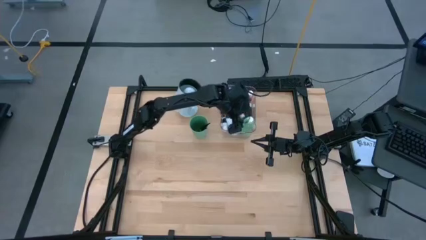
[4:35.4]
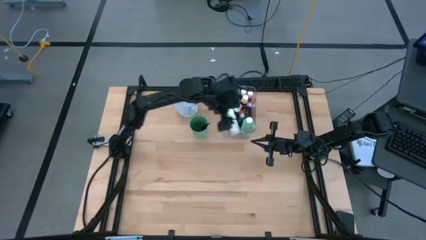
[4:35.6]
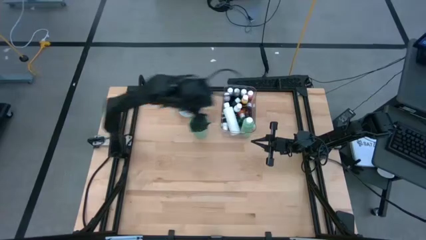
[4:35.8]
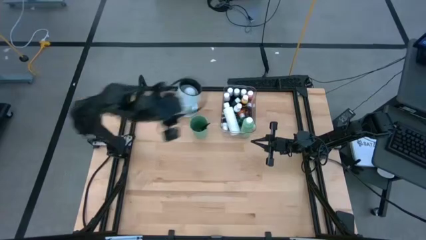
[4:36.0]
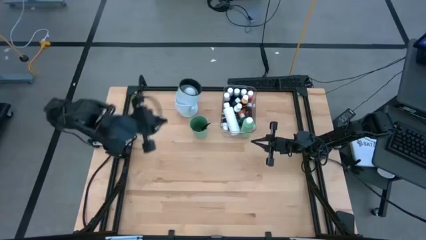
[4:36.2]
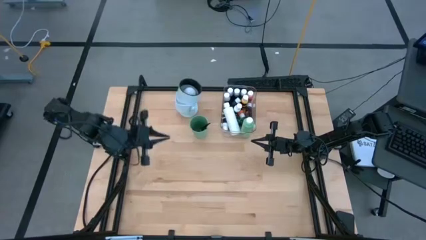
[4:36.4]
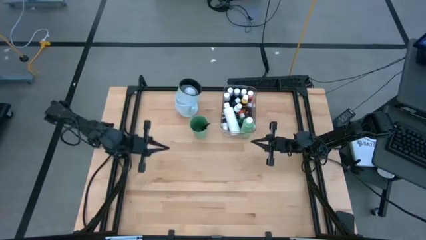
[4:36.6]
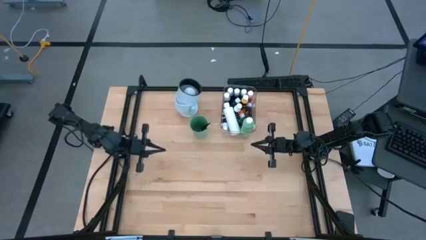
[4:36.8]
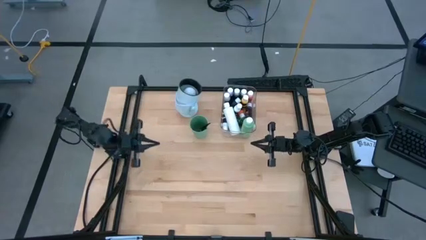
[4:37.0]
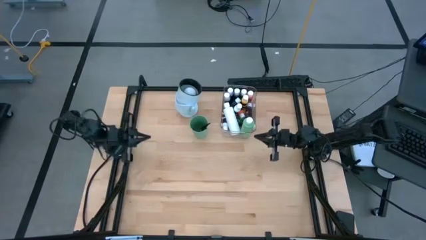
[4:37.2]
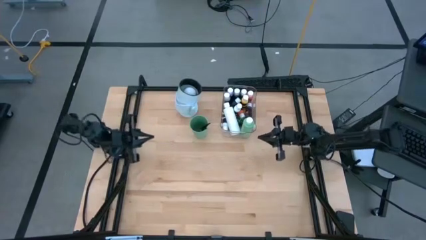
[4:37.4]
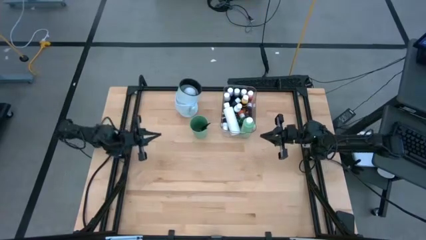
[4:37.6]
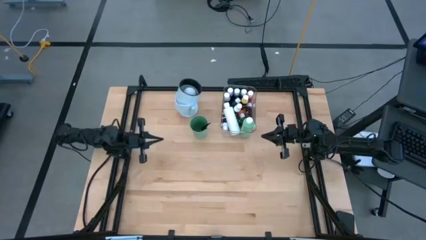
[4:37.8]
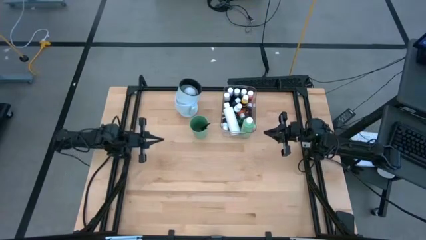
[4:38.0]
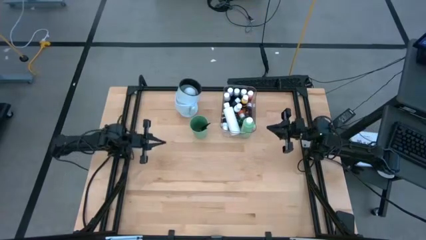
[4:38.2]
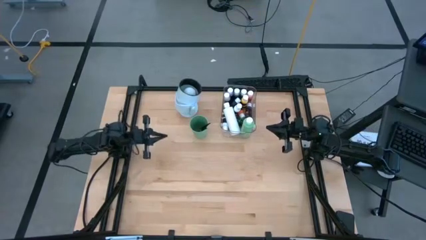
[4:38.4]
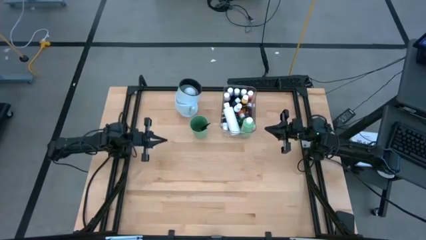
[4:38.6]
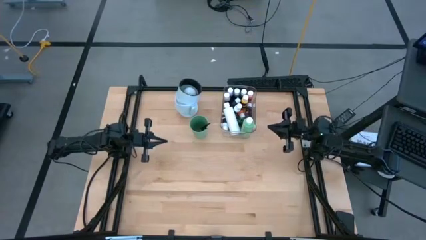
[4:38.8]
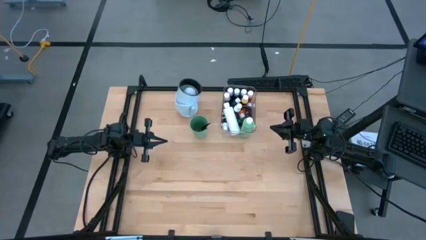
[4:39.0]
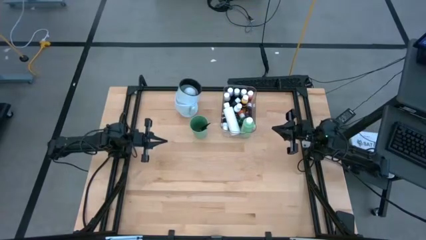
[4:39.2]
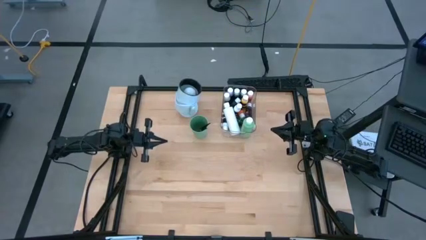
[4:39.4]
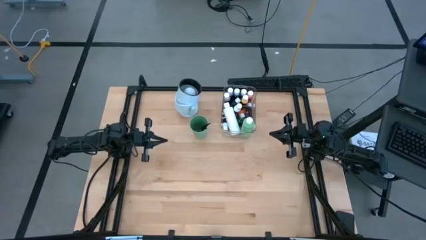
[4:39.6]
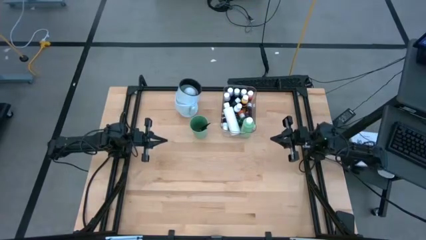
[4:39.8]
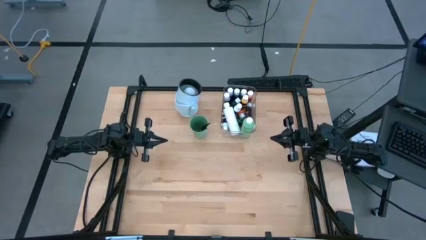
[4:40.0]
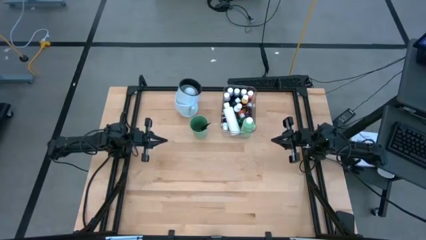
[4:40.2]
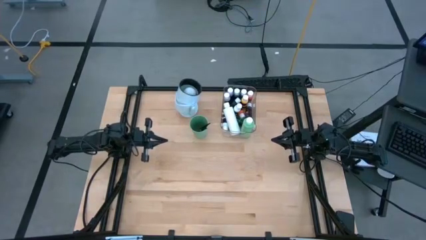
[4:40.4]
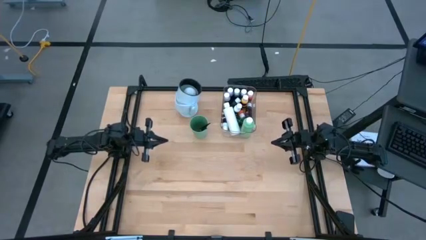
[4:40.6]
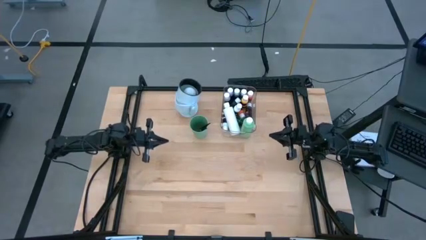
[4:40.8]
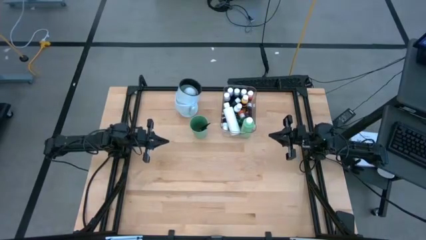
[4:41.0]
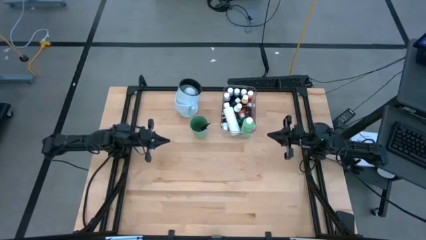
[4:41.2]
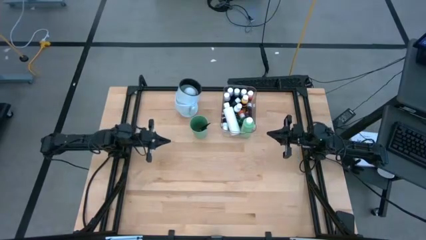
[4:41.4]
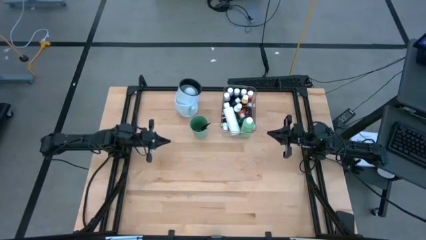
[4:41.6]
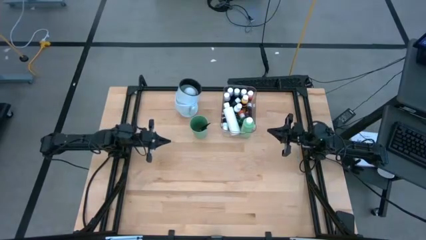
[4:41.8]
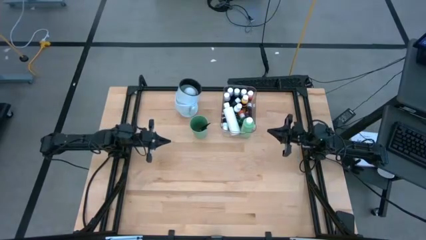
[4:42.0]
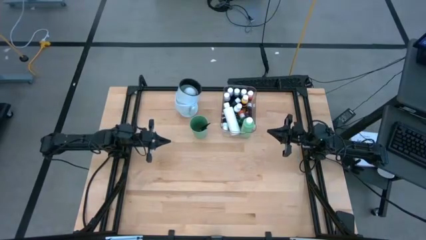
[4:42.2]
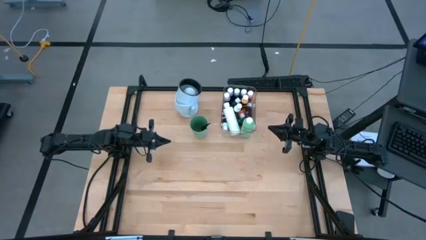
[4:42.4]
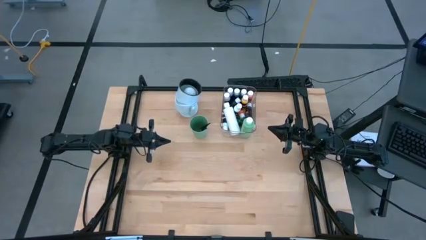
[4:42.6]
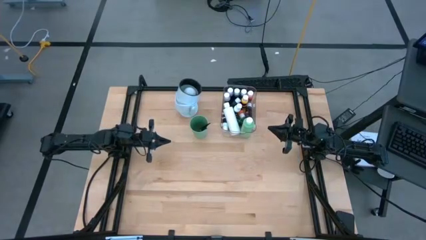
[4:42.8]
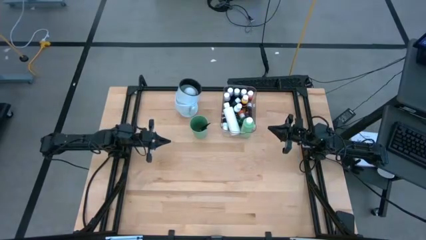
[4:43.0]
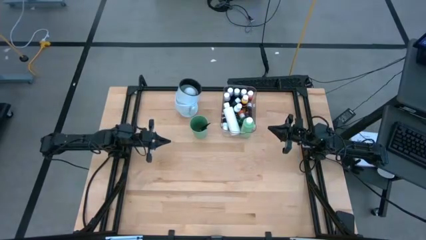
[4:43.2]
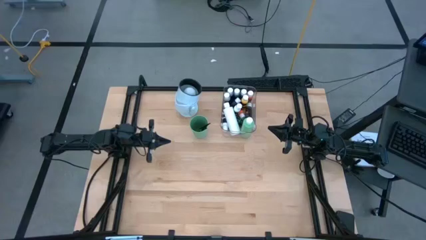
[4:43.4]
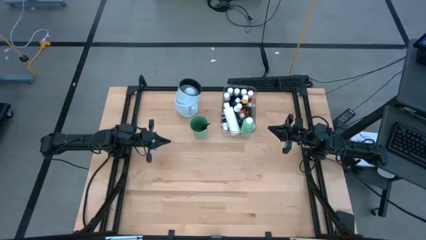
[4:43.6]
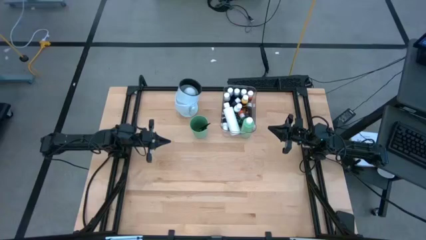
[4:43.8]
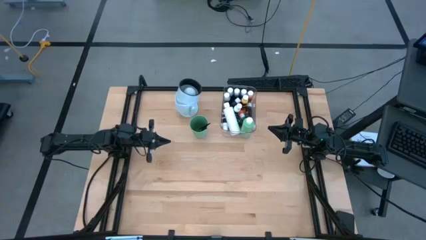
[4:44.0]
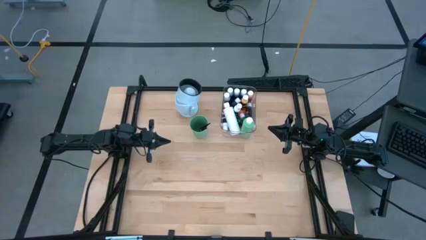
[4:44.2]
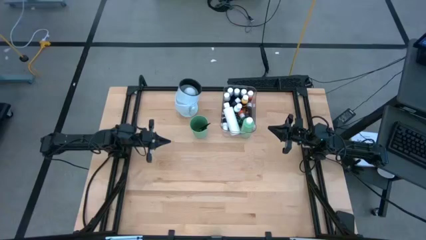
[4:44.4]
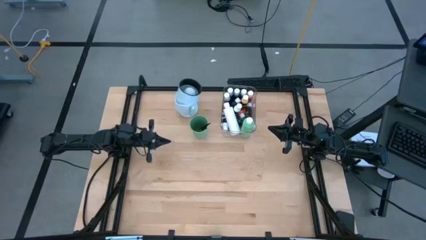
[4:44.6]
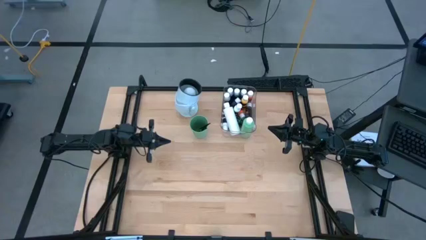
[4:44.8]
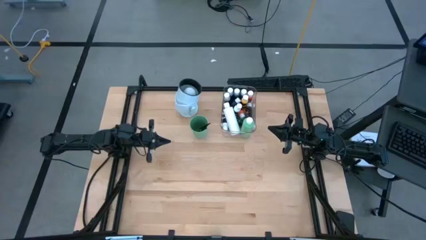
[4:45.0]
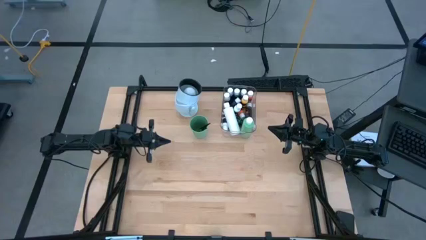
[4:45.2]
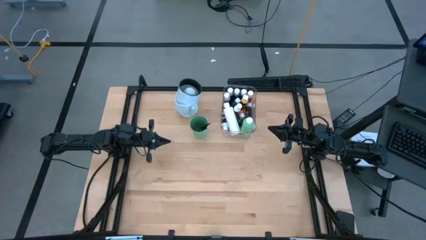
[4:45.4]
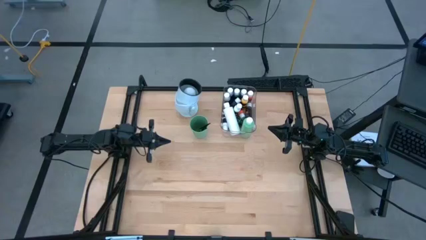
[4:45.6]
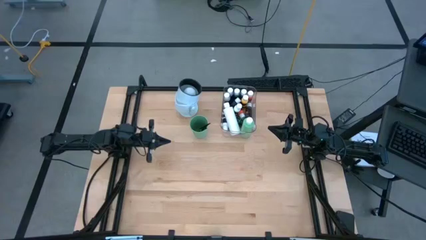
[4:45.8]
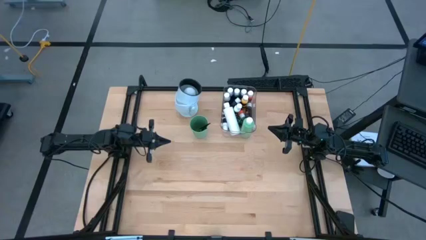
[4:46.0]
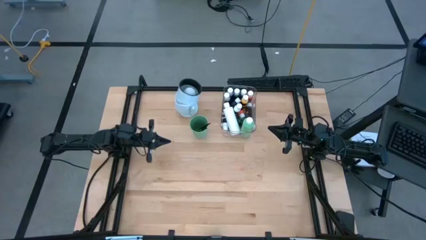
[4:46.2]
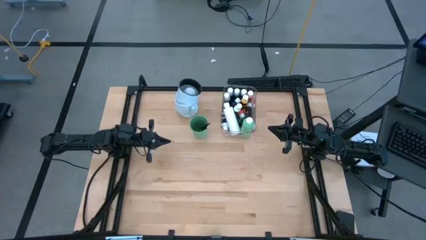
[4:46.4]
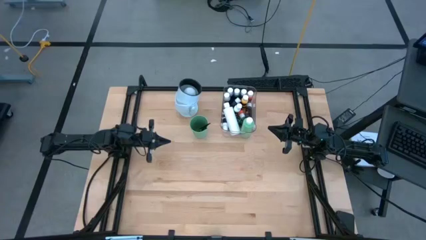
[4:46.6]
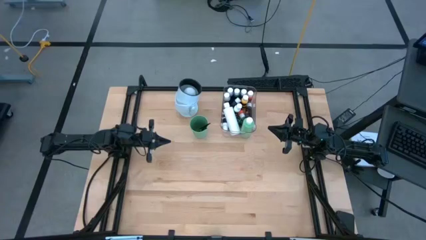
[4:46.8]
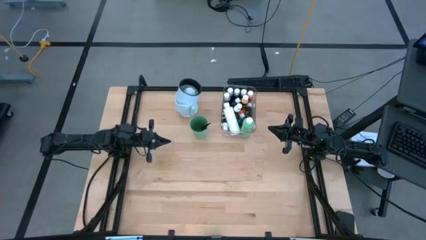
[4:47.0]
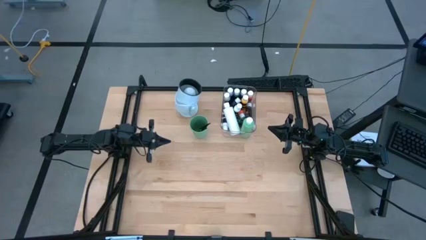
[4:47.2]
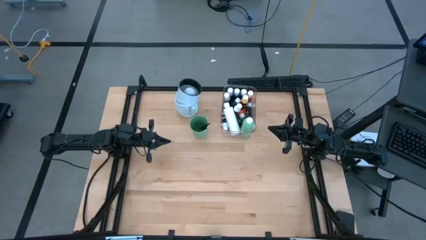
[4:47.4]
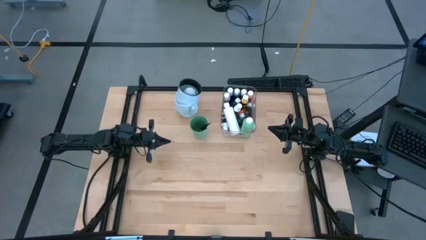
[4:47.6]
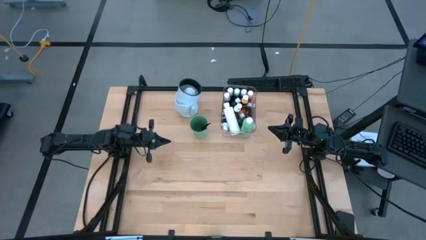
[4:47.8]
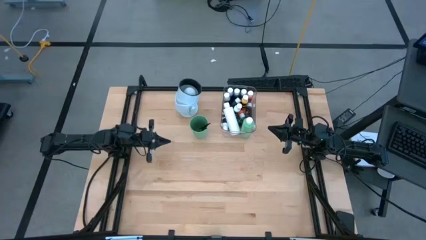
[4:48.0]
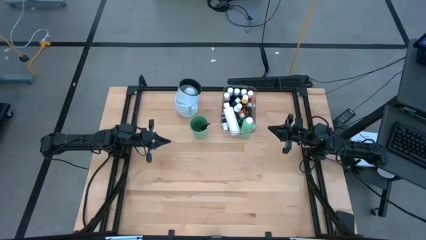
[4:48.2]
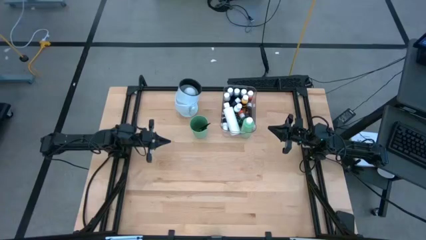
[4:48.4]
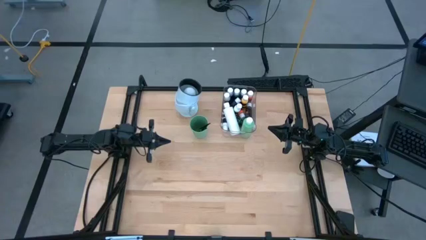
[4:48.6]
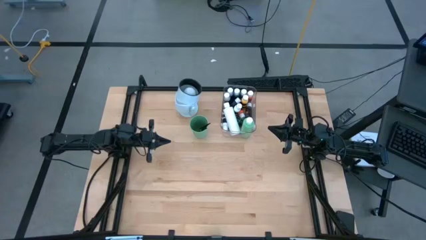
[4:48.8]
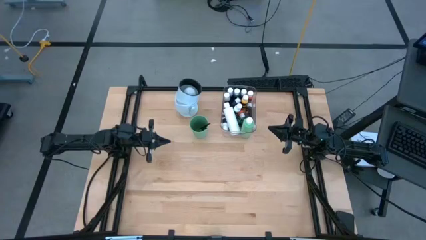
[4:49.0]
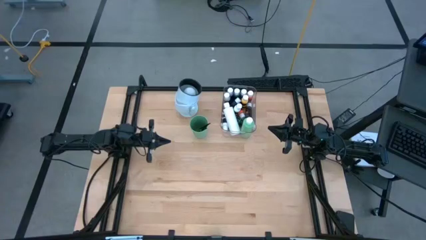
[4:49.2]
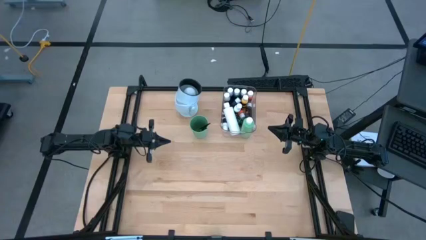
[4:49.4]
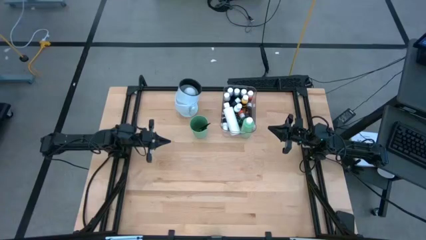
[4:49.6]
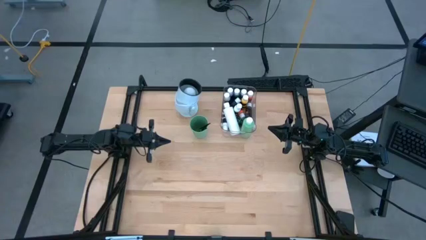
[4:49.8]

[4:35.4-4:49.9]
Task: Pick & Place Paint Supplies
Return to Home Position
